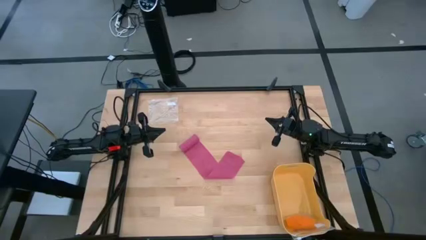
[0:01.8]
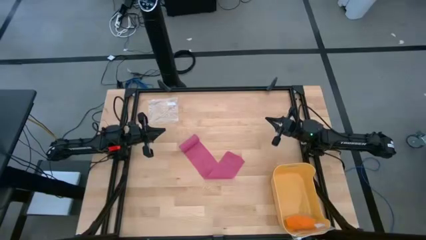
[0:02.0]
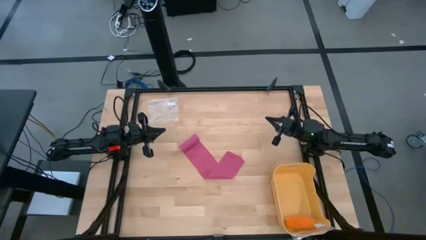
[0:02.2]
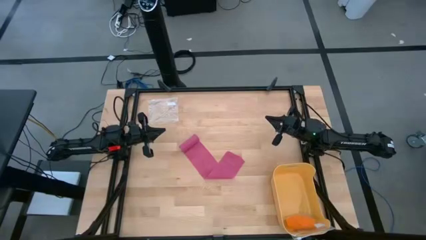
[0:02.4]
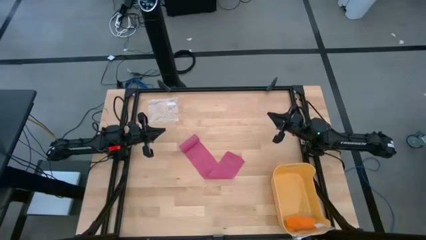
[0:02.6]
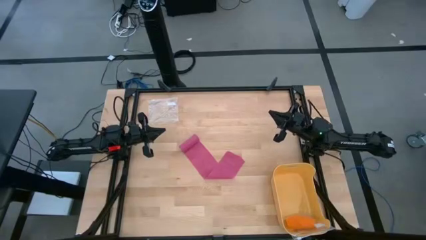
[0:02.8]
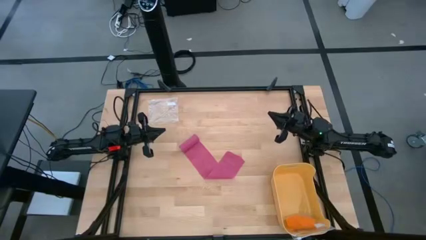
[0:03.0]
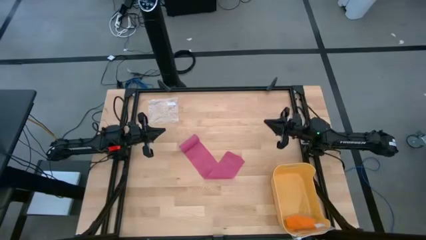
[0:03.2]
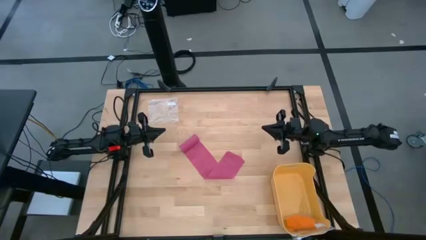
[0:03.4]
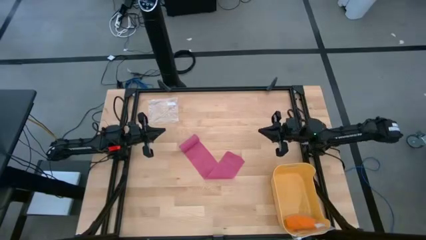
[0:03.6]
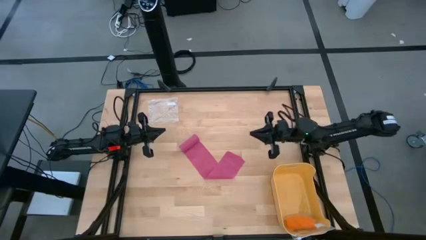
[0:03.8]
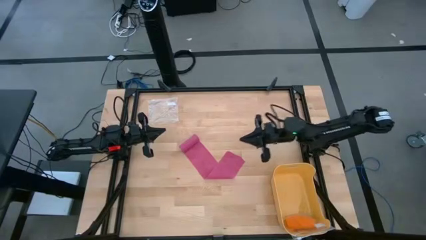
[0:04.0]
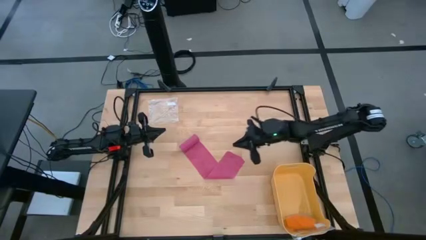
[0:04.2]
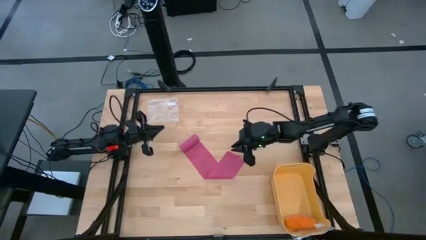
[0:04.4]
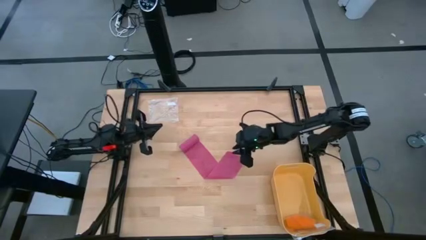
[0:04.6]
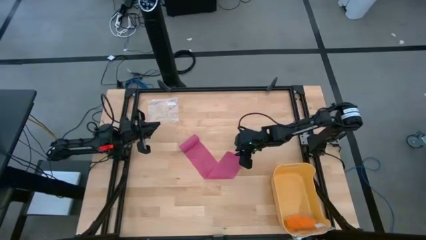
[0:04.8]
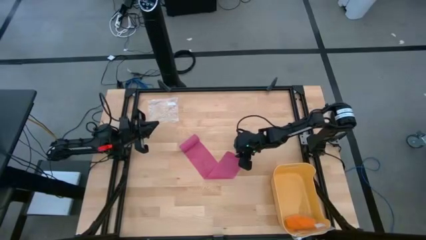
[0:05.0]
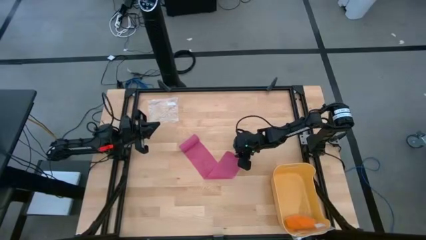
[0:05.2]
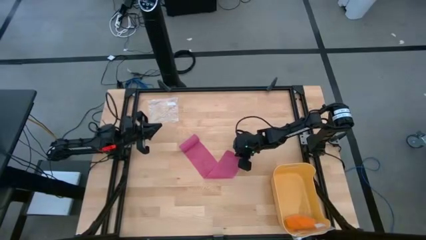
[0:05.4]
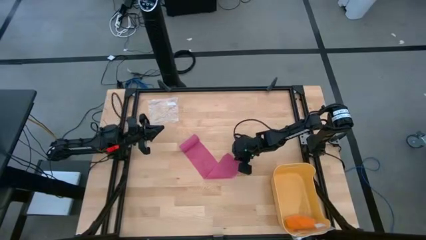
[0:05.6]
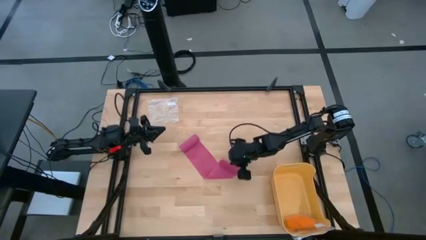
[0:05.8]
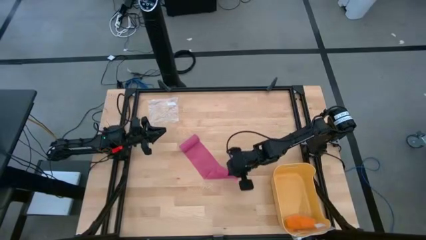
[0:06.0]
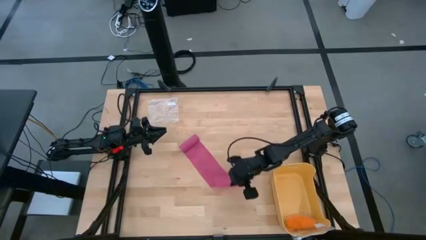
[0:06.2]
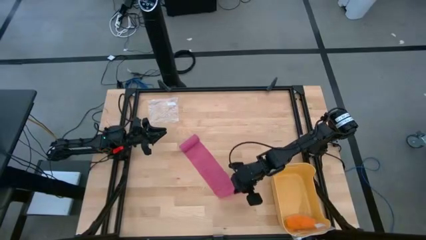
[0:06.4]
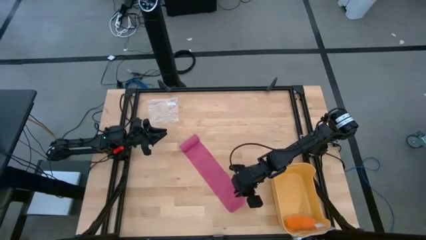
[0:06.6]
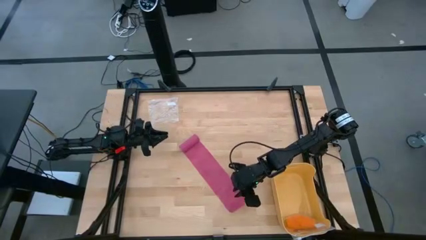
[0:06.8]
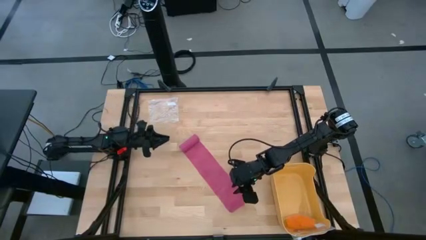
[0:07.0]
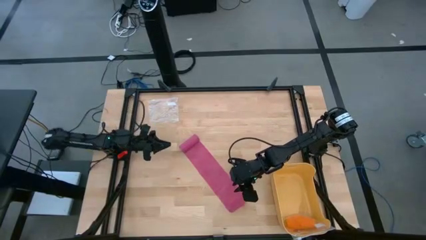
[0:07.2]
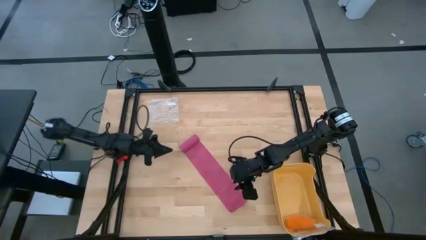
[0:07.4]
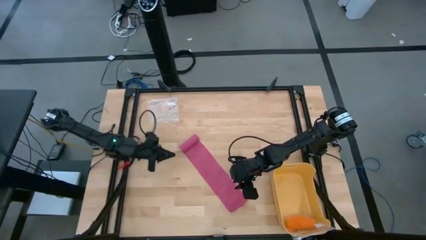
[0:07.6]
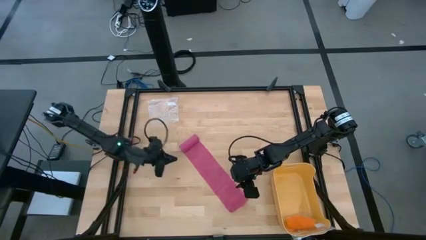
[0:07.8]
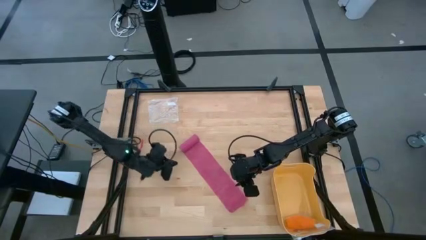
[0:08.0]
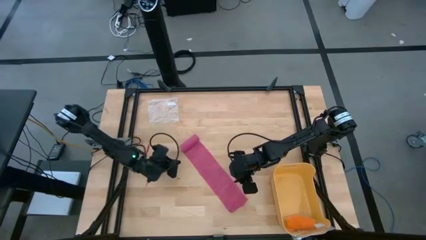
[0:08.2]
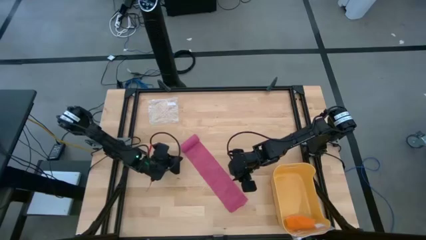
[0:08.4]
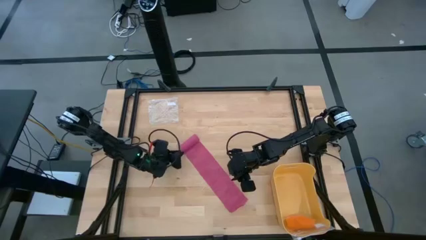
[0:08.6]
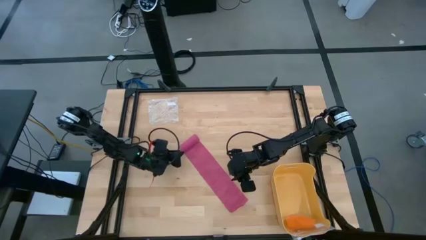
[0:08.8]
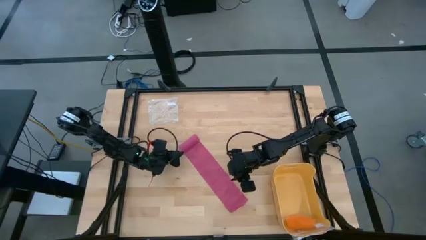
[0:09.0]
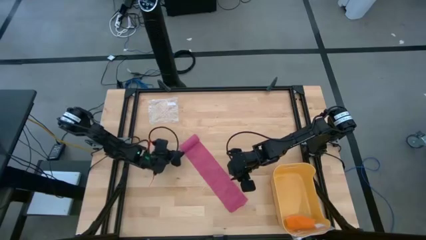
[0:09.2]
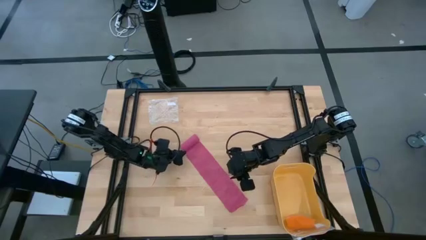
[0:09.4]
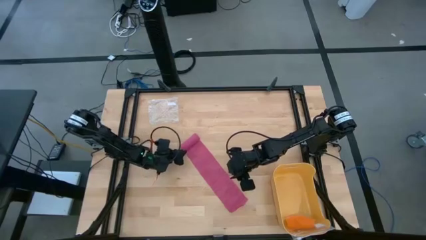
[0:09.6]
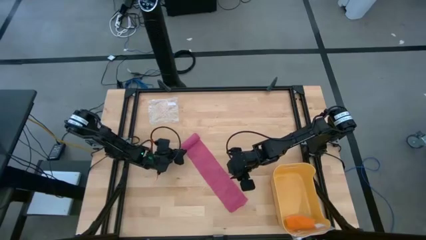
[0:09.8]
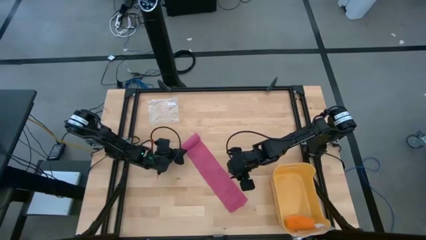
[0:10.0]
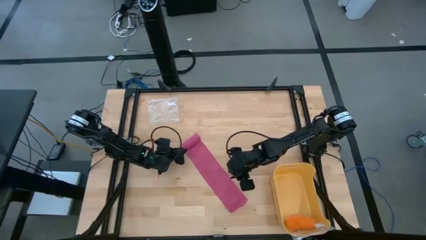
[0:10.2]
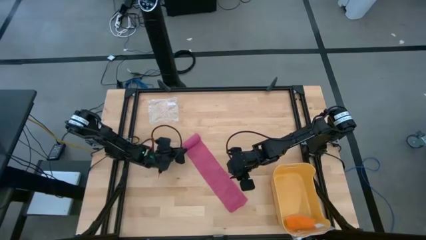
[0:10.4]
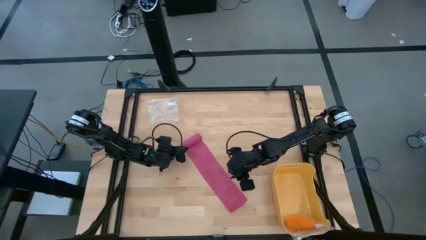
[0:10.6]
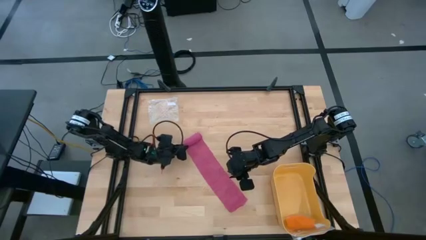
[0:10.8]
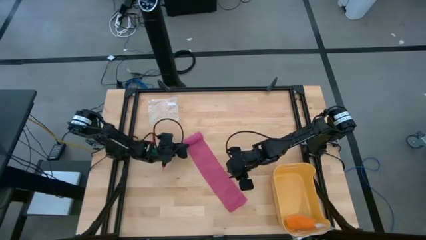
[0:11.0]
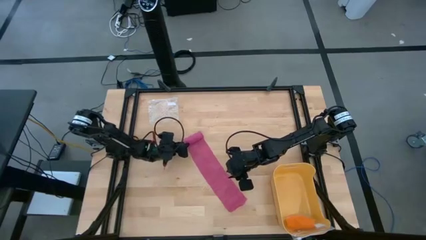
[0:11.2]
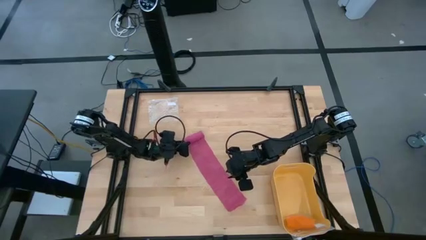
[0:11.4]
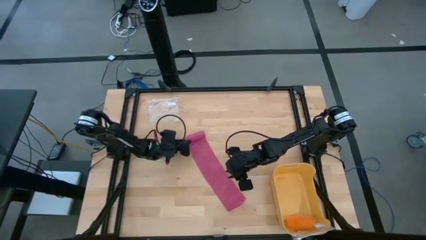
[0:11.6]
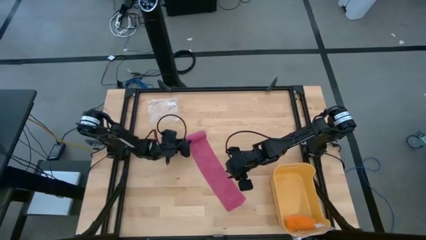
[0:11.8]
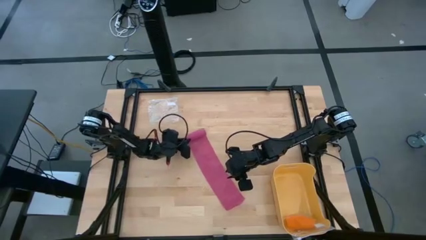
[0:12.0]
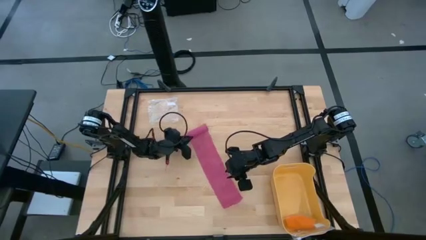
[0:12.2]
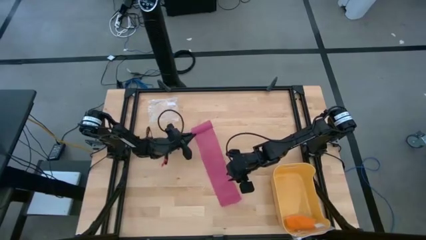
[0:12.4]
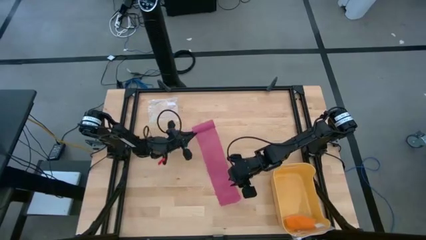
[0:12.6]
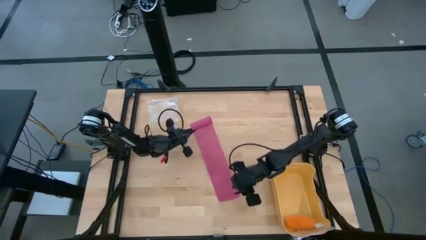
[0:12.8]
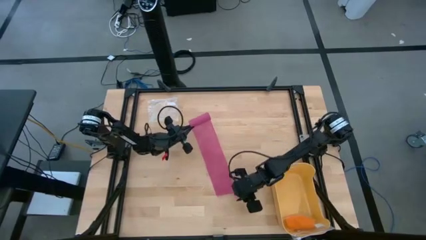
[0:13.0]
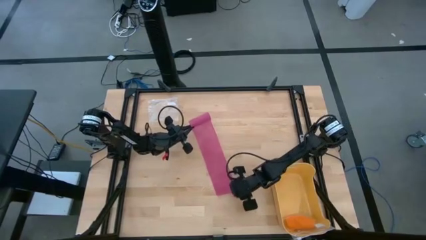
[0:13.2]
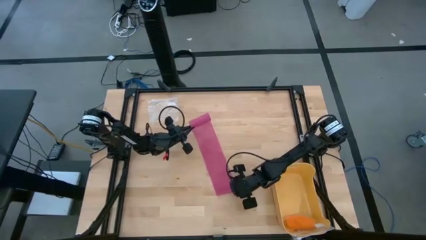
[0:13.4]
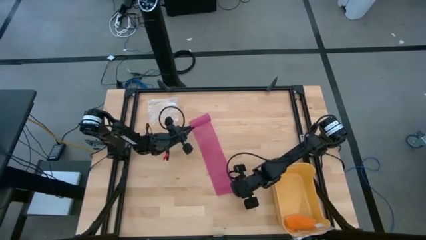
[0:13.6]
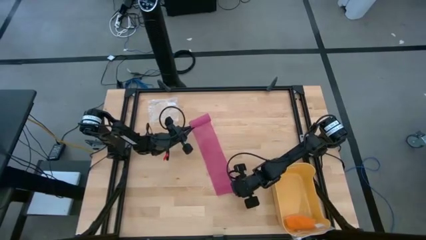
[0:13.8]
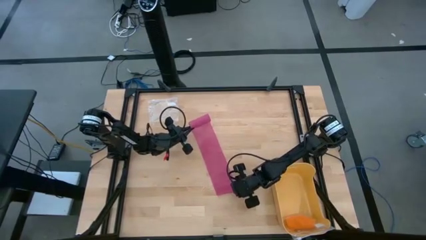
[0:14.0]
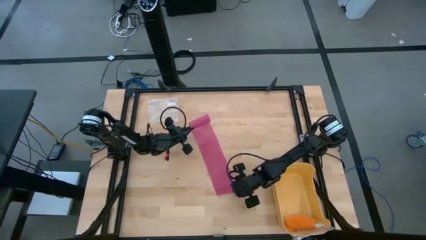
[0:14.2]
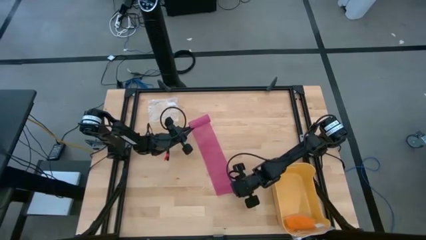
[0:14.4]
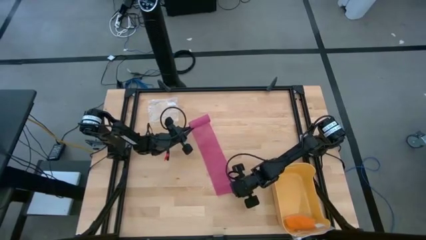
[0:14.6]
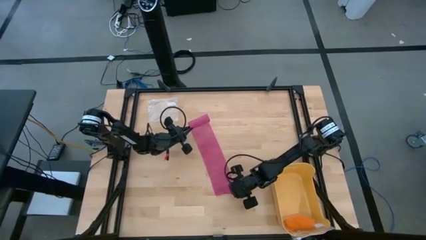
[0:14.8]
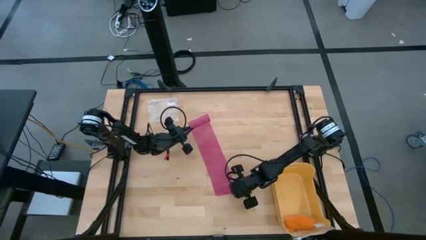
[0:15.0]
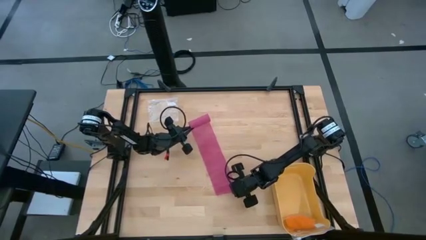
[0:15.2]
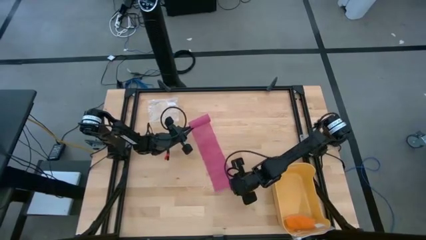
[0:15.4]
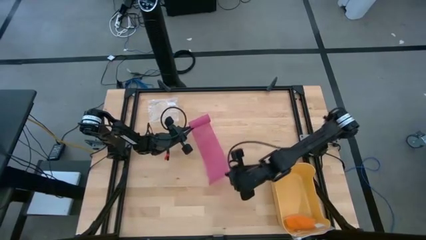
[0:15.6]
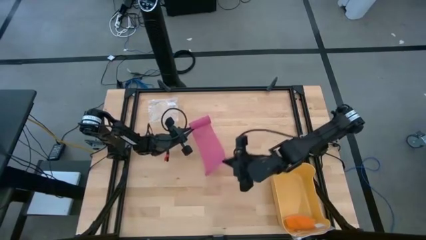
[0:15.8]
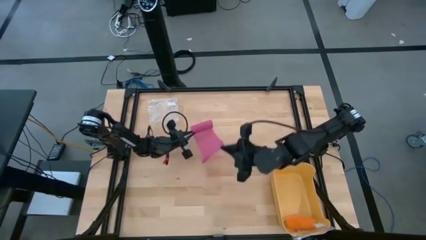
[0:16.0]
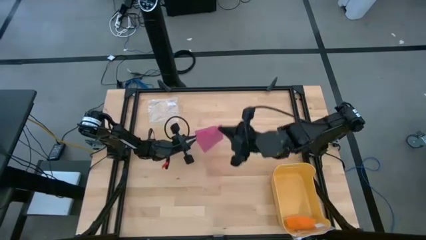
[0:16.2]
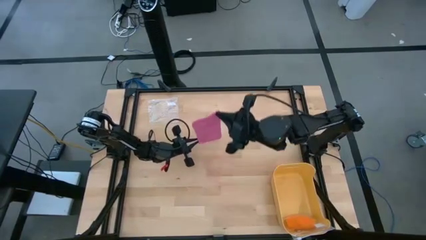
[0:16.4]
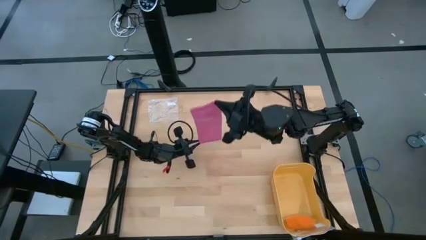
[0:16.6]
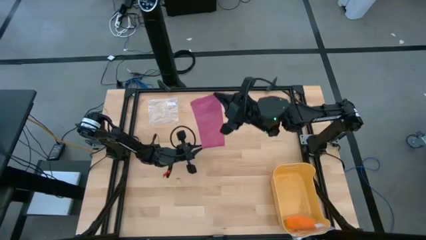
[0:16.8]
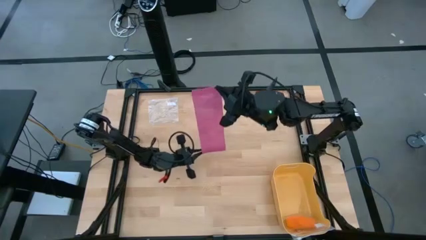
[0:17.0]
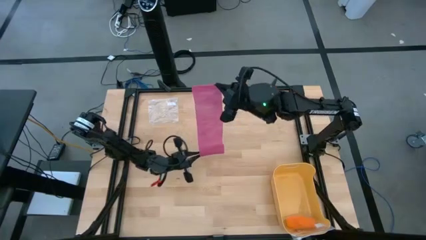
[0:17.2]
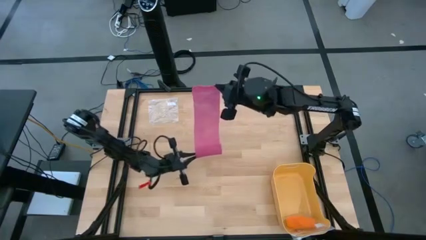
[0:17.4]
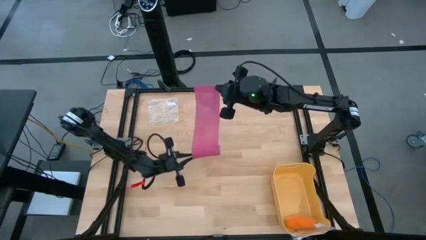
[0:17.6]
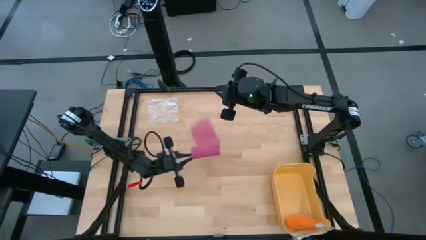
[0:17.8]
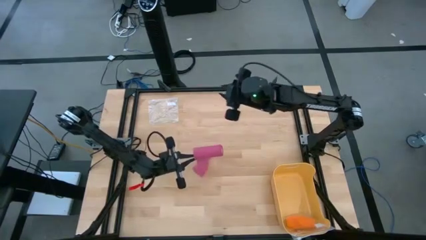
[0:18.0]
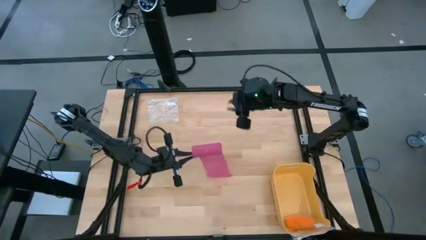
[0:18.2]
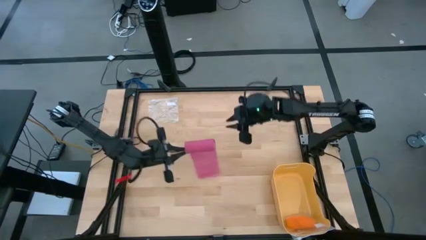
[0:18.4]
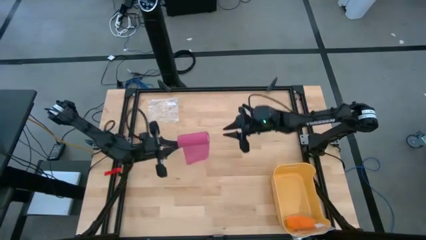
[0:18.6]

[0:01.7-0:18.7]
Task: Roll bandage
Roll the pink bandage
